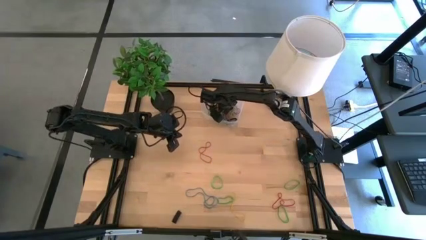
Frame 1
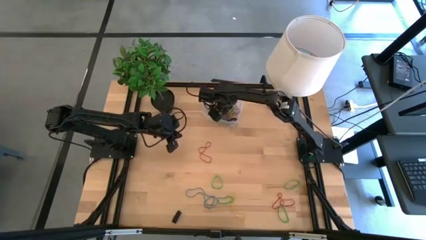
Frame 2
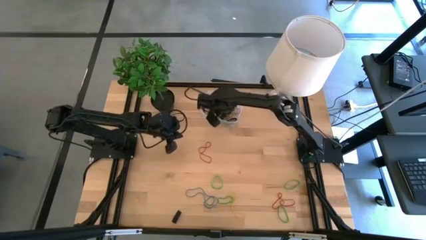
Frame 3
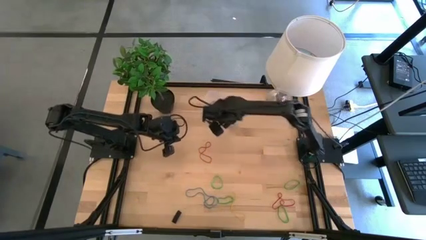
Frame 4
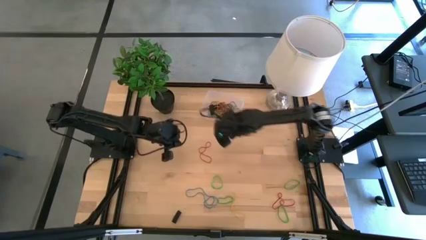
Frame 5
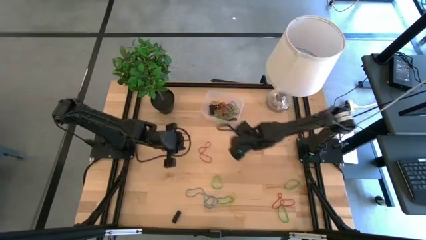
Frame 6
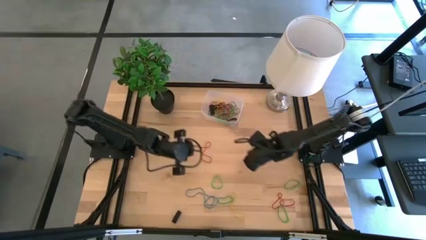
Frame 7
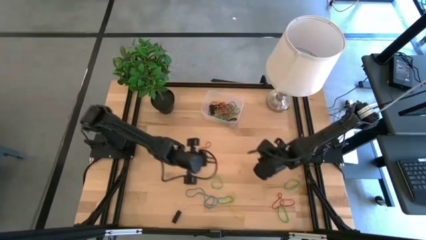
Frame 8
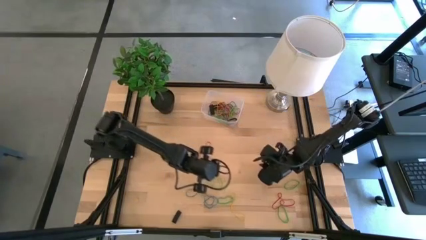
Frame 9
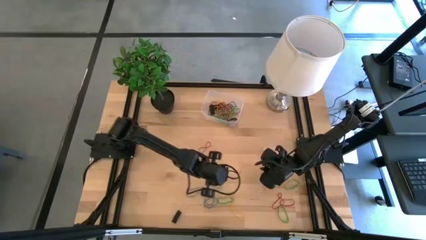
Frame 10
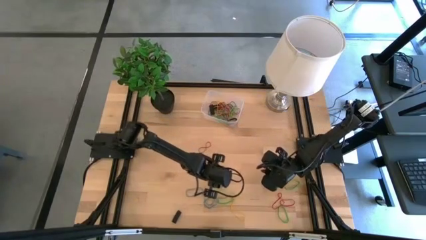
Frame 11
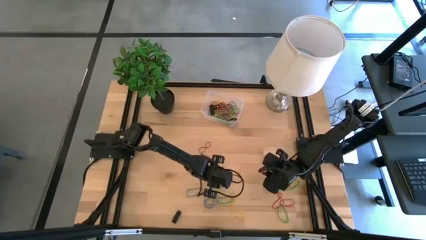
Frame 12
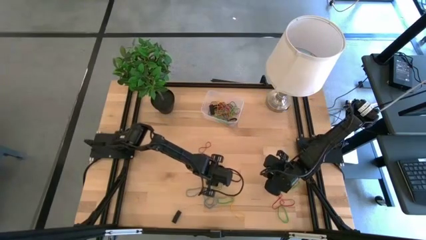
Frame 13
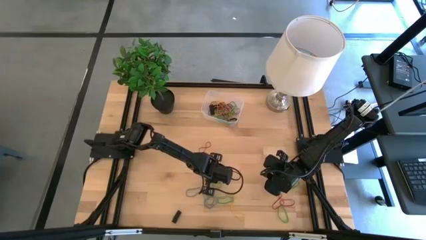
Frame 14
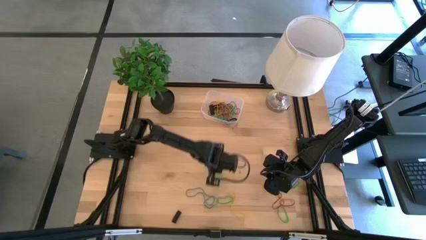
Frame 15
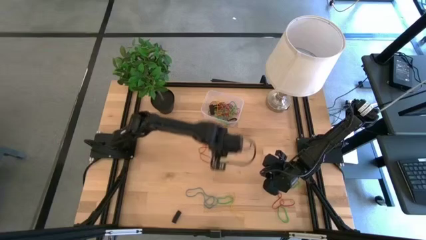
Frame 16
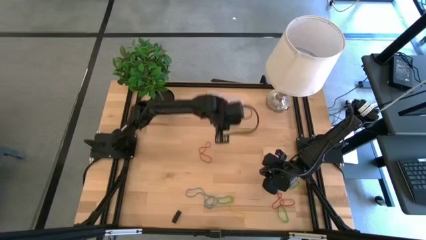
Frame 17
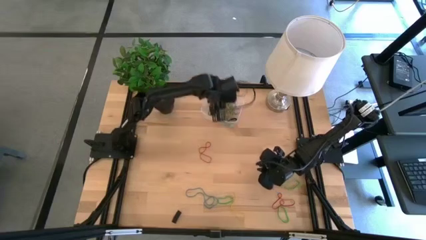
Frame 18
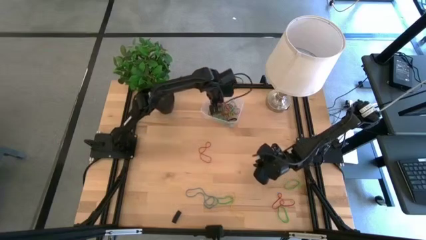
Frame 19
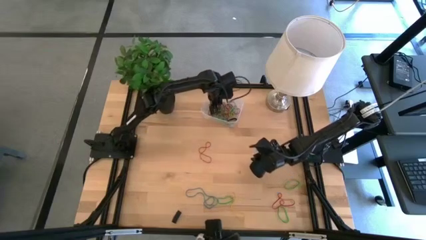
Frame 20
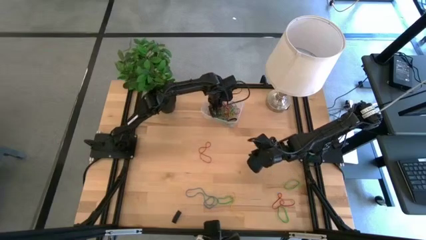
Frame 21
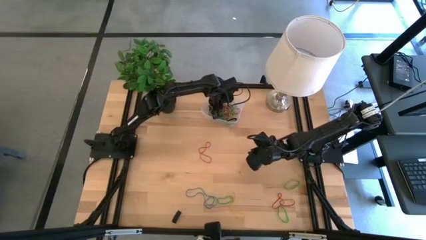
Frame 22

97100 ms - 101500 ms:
Task: Pick and place rubber bands into bin
Put the green rubber band into the transparent bin

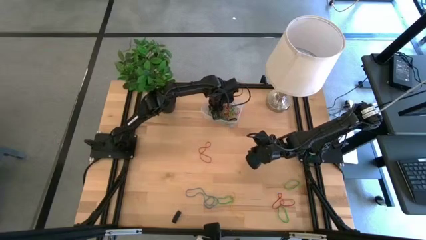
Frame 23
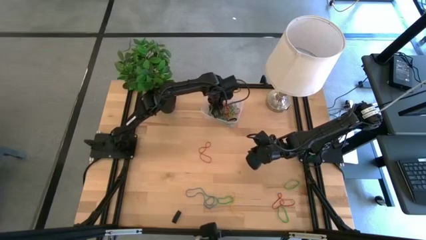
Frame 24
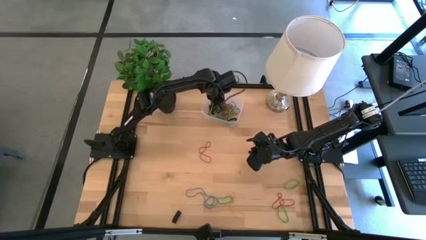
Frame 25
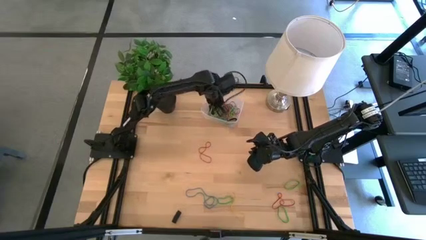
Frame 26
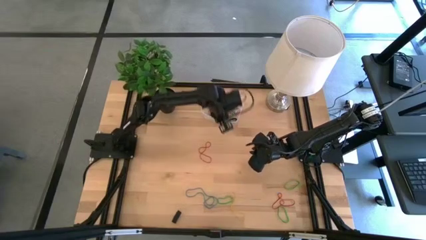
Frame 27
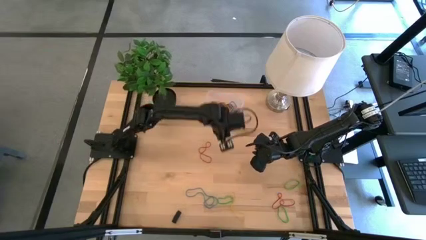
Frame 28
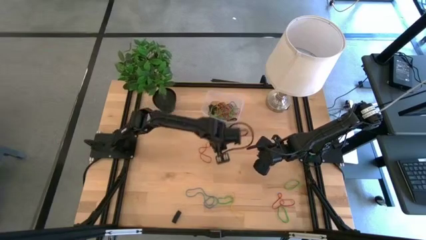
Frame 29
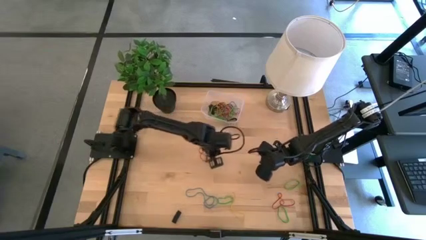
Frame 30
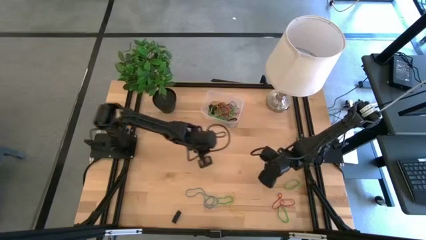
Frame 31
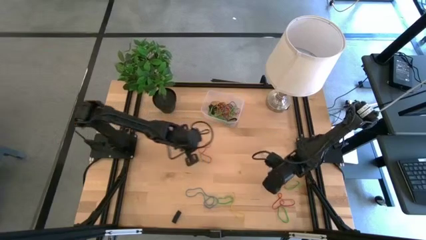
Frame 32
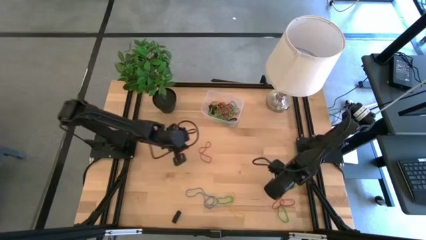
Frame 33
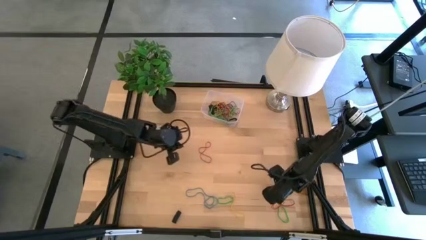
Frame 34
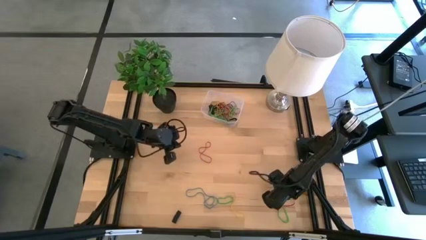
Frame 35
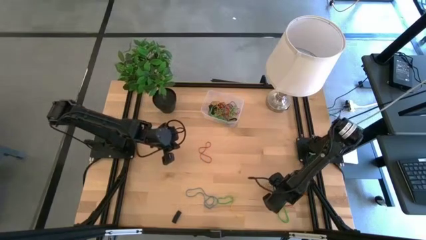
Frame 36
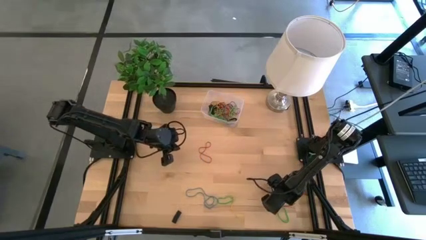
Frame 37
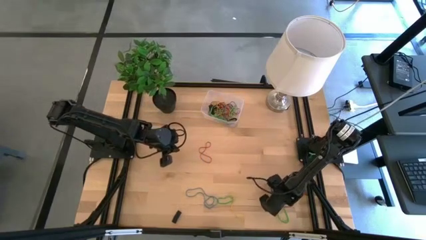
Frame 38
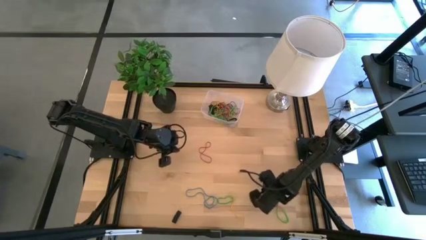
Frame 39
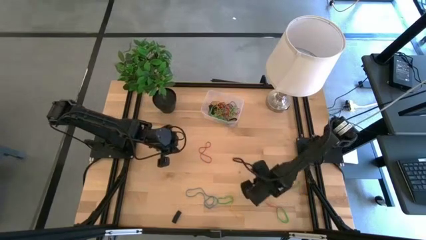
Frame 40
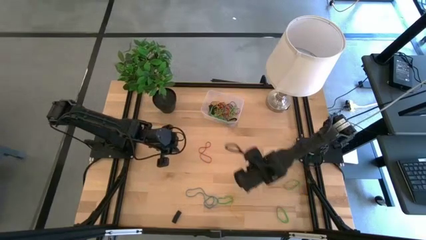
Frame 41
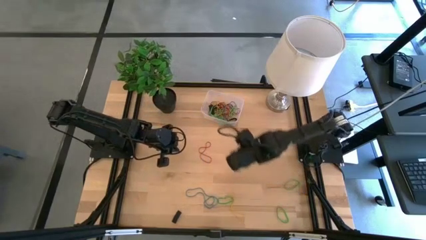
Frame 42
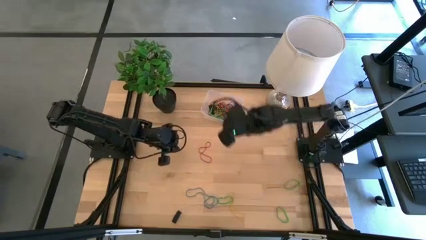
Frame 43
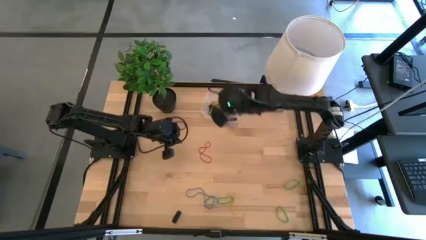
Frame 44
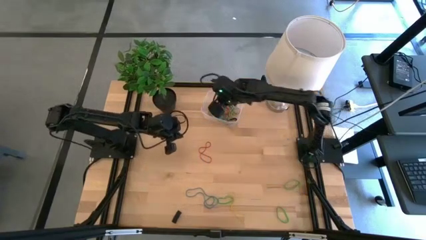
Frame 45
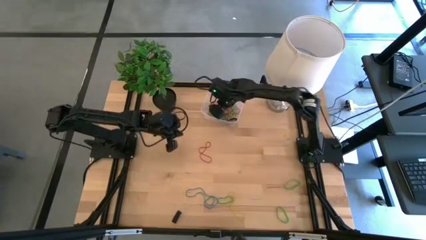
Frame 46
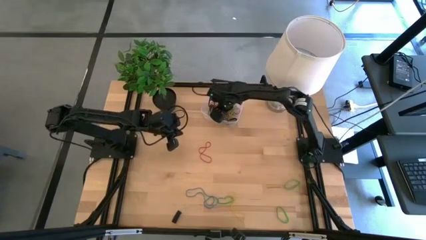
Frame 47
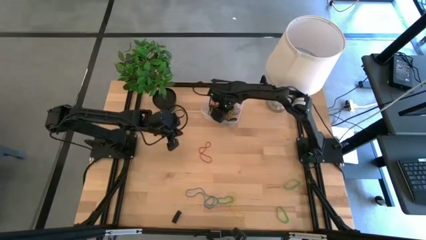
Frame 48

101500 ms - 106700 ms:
Put the red rubber band into the transparent bin

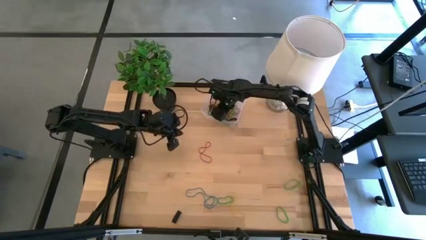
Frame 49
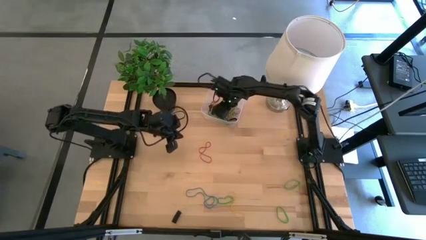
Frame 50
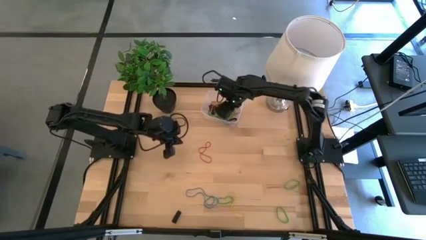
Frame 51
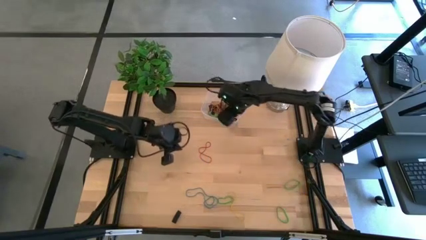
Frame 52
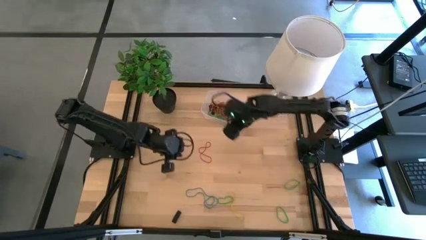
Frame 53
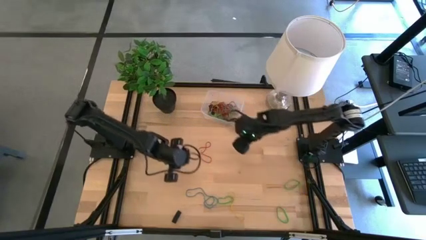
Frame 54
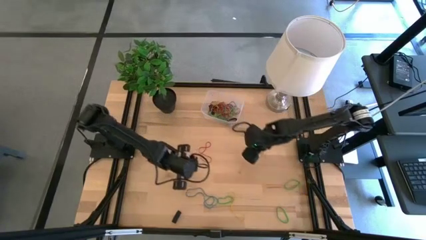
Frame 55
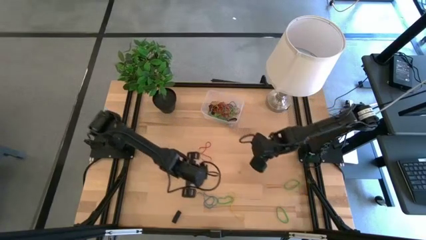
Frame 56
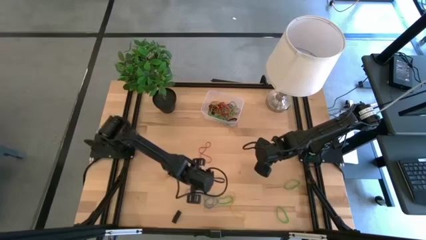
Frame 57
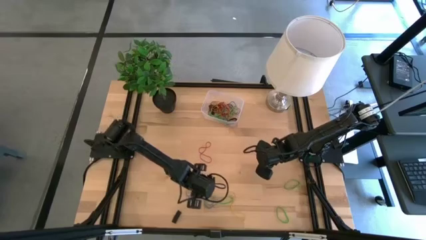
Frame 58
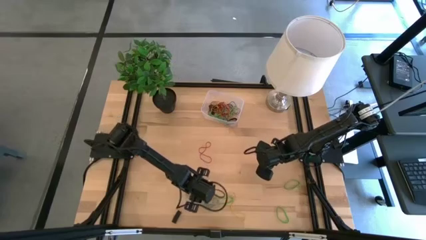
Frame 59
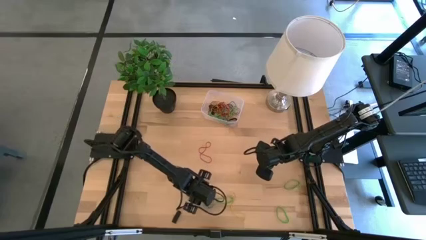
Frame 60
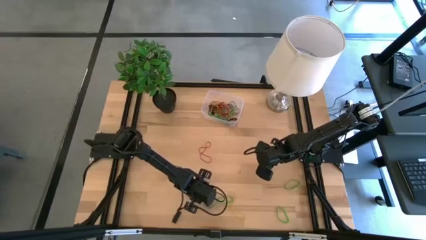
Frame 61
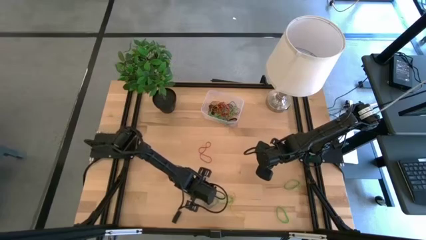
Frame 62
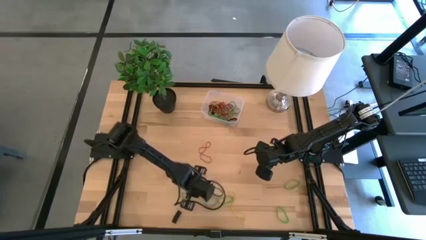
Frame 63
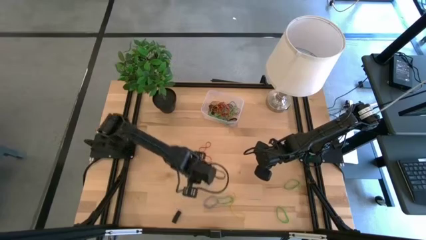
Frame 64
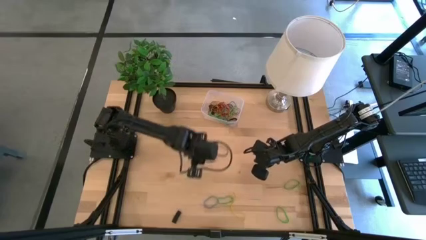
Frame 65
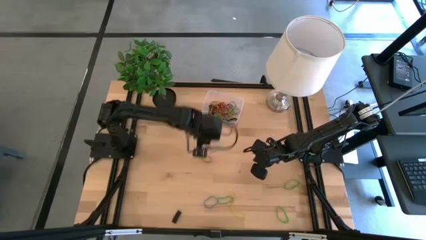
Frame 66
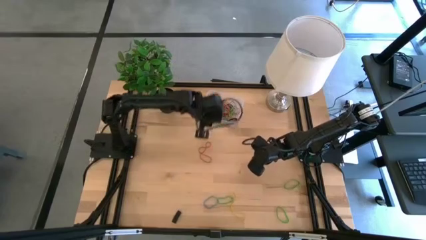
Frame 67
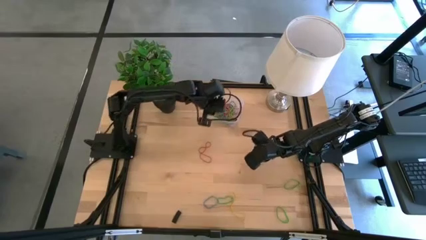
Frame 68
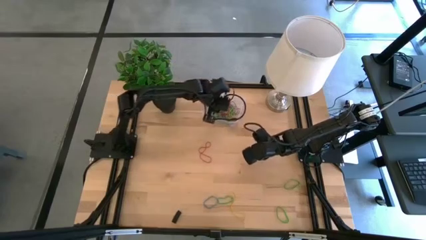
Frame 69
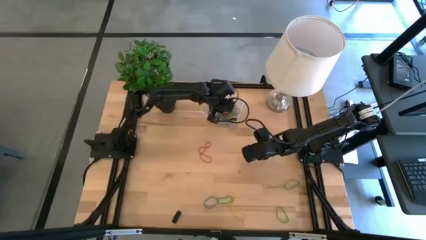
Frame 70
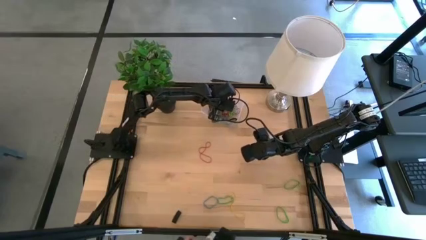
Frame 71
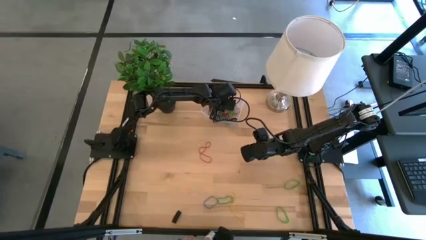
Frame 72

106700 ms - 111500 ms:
Put the blue rubber band into the transparent bin

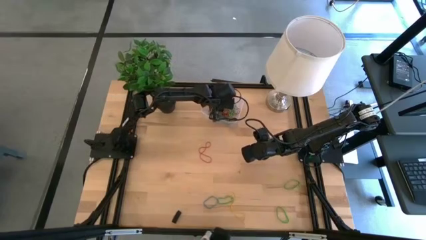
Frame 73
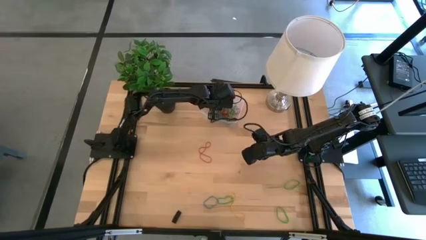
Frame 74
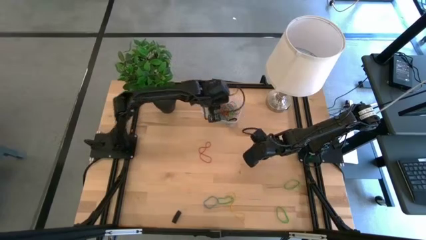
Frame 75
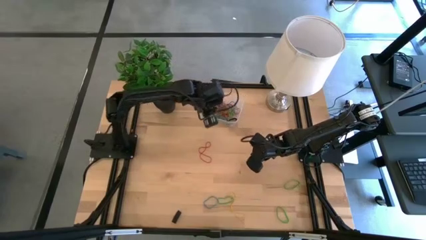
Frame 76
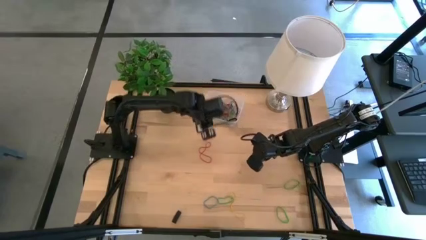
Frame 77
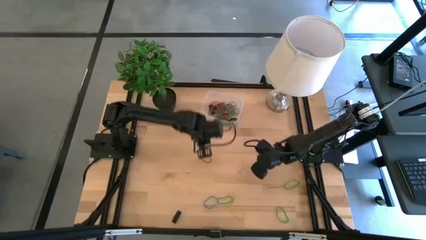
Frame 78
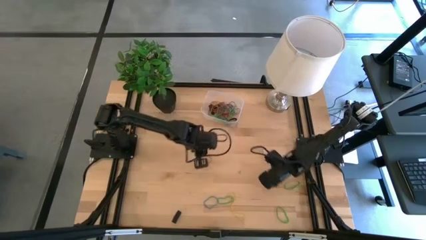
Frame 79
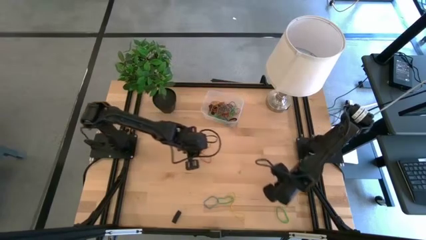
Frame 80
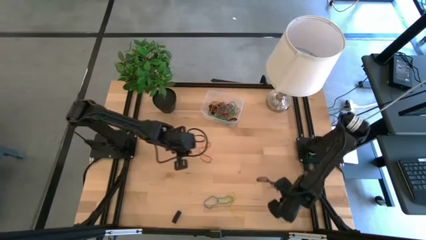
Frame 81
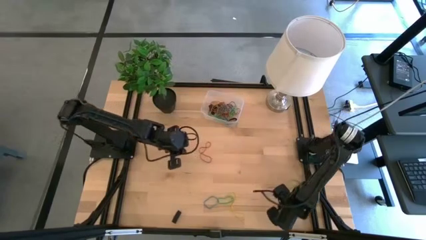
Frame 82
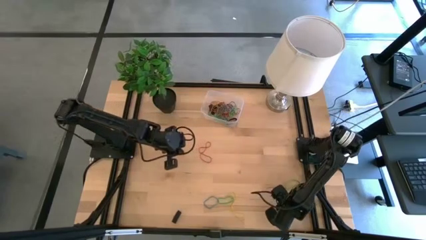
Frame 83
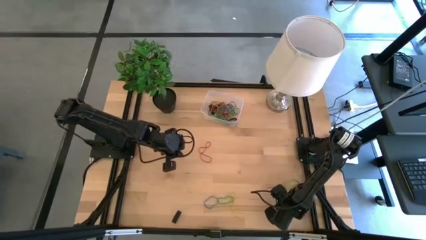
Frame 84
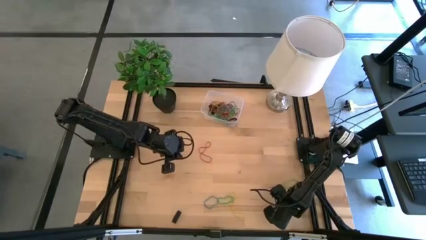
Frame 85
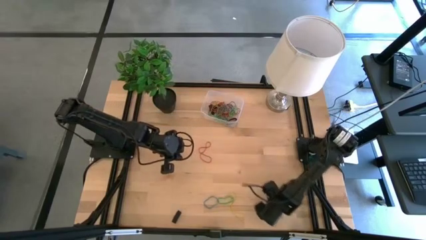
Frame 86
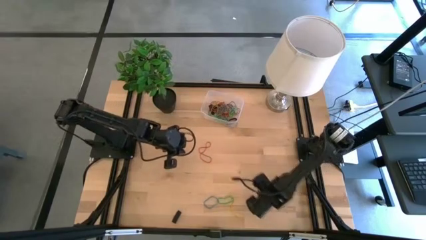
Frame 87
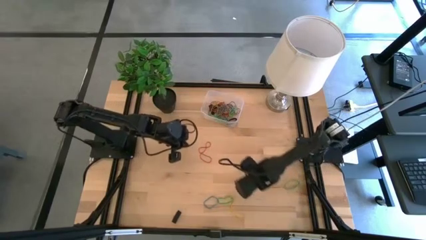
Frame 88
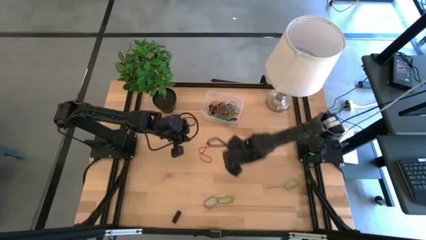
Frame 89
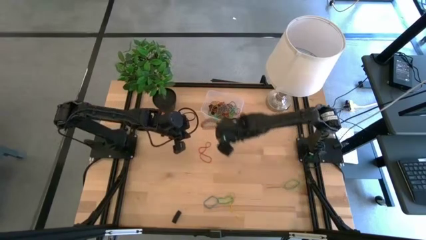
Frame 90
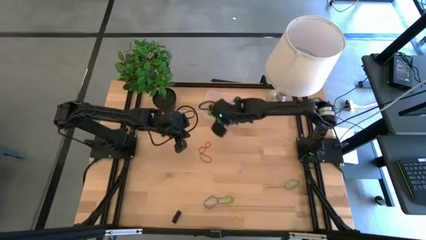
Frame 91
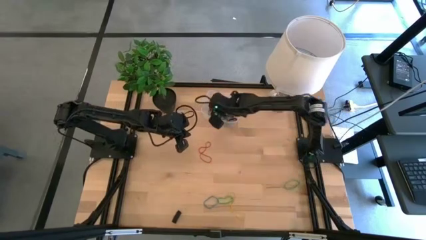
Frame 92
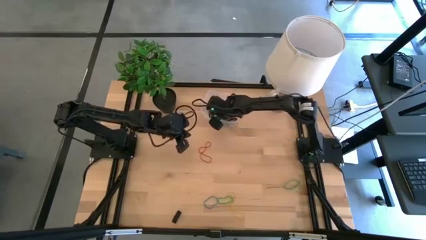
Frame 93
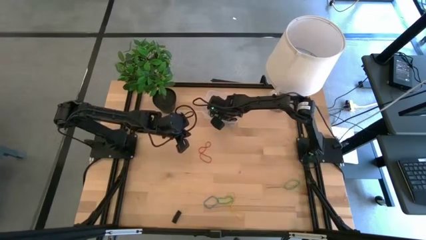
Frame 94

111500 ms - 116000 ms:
Put the green rubber band into the transparent bin
